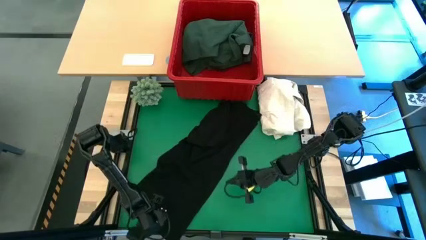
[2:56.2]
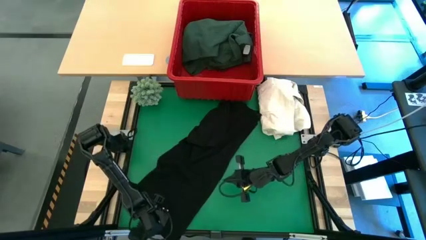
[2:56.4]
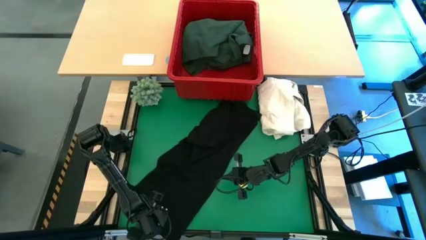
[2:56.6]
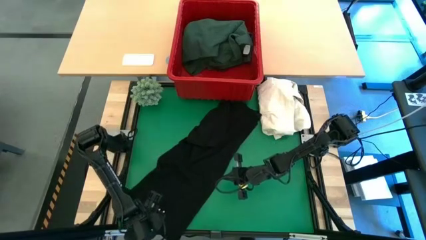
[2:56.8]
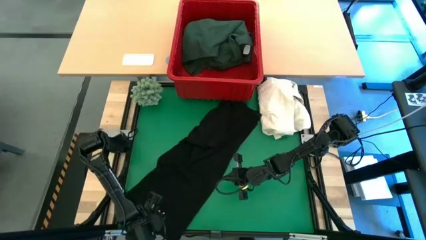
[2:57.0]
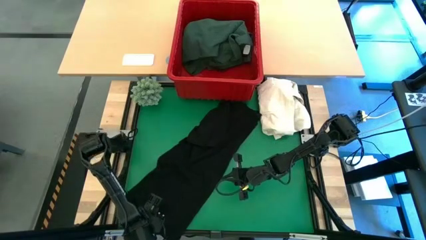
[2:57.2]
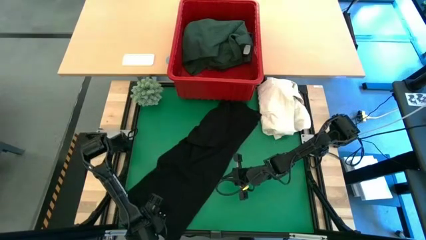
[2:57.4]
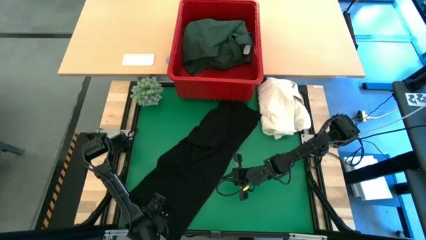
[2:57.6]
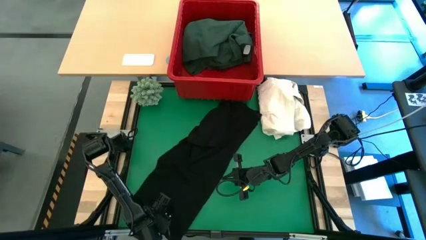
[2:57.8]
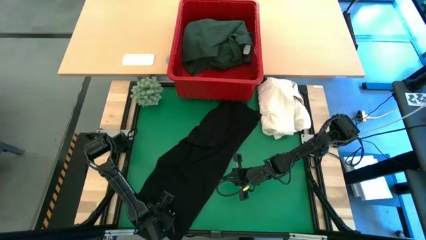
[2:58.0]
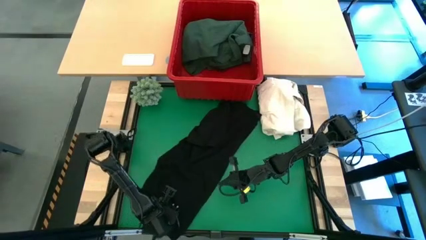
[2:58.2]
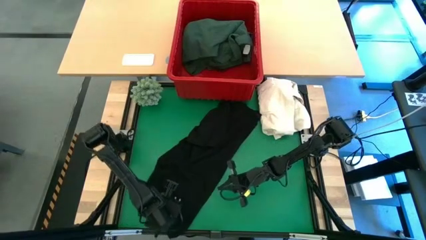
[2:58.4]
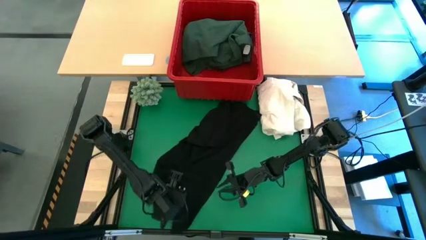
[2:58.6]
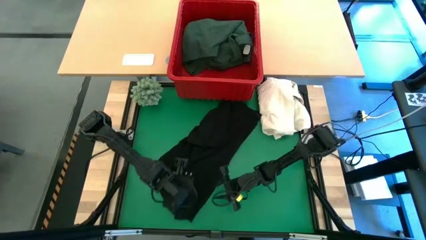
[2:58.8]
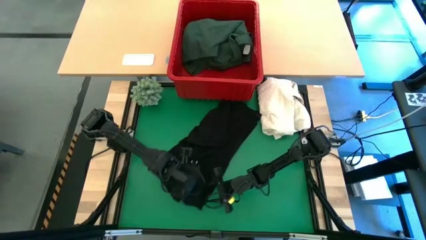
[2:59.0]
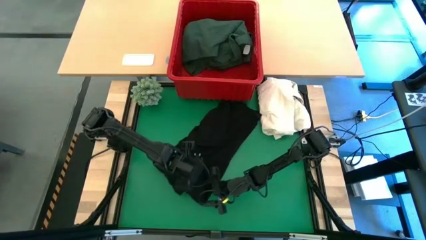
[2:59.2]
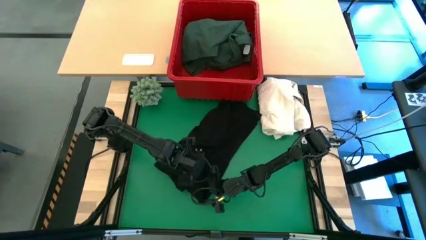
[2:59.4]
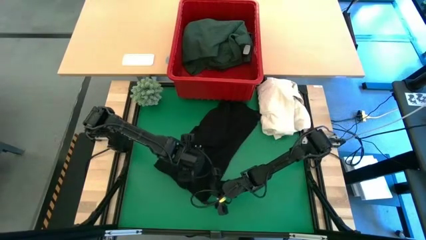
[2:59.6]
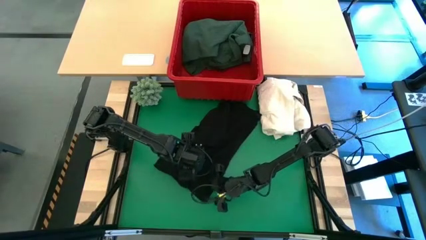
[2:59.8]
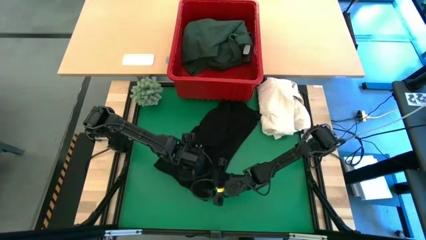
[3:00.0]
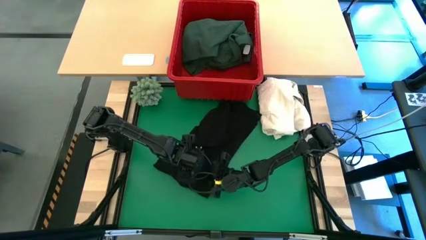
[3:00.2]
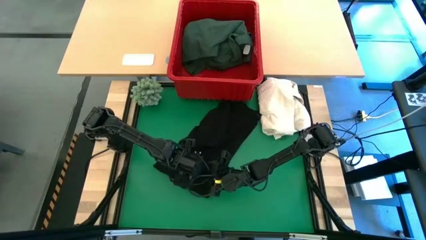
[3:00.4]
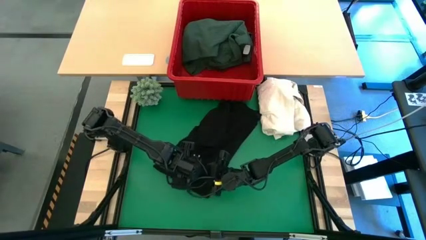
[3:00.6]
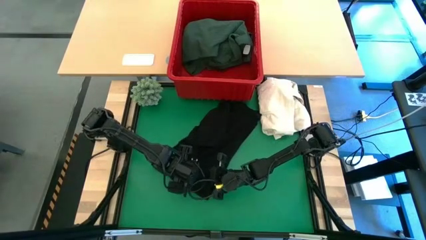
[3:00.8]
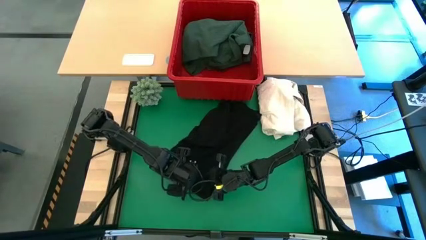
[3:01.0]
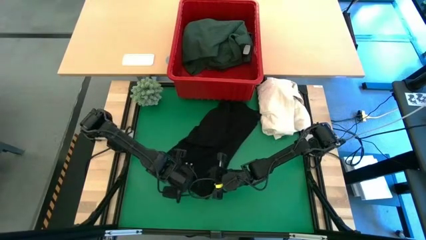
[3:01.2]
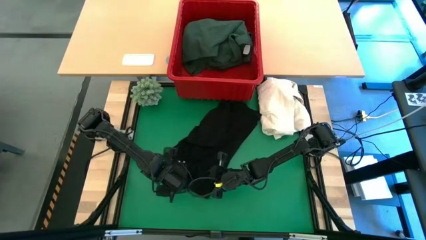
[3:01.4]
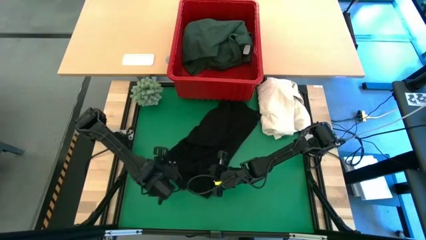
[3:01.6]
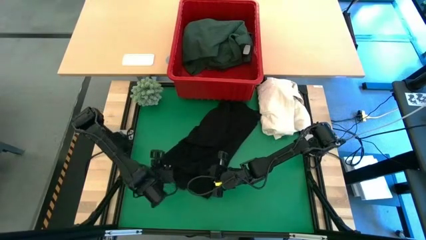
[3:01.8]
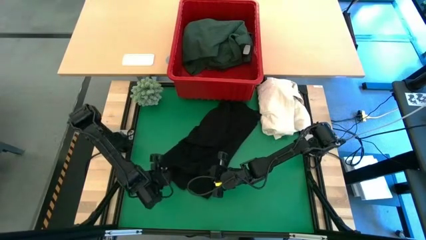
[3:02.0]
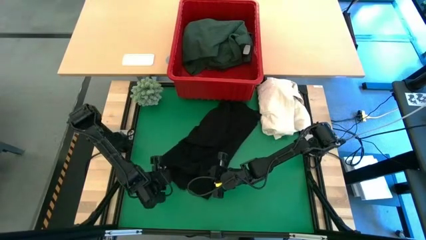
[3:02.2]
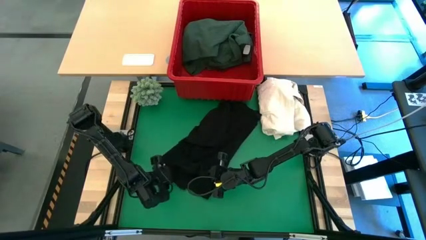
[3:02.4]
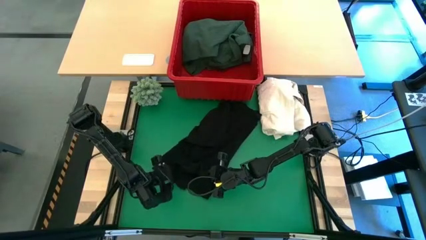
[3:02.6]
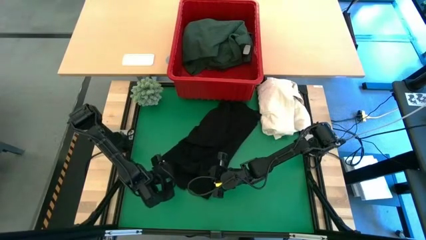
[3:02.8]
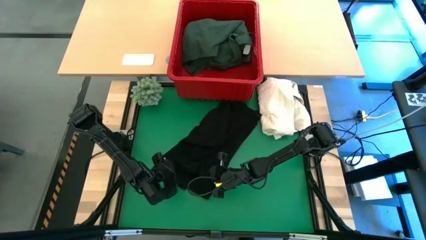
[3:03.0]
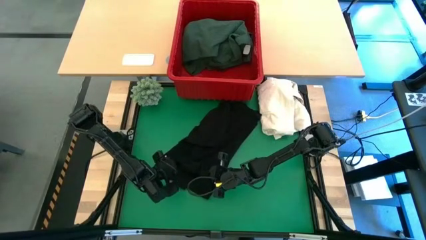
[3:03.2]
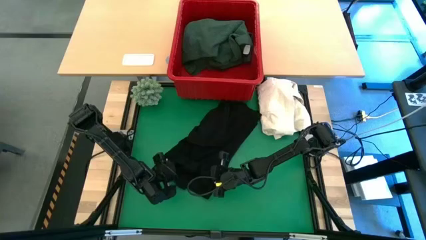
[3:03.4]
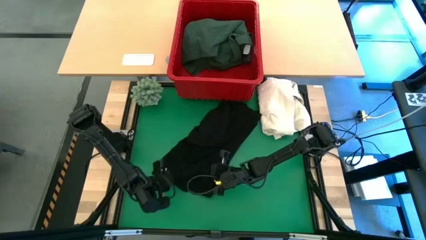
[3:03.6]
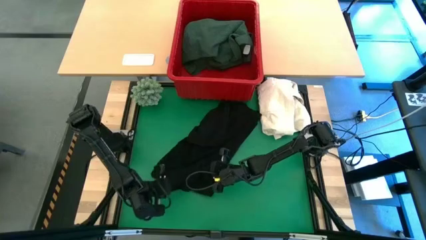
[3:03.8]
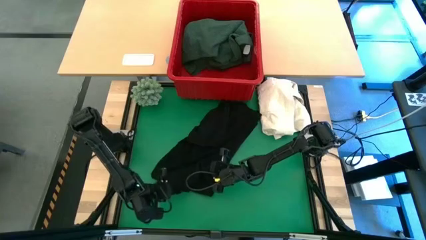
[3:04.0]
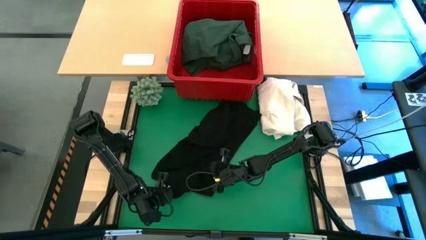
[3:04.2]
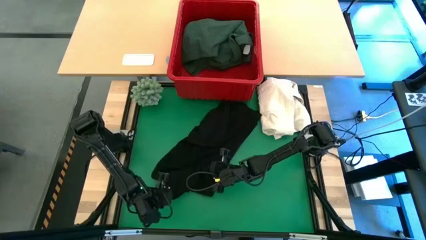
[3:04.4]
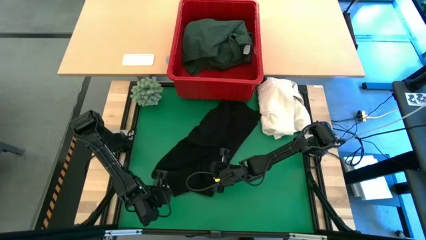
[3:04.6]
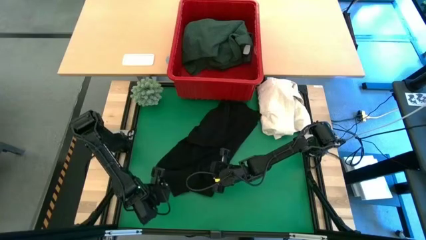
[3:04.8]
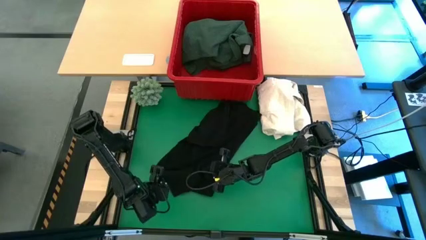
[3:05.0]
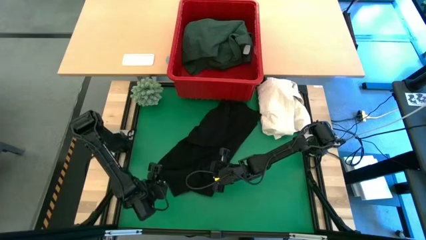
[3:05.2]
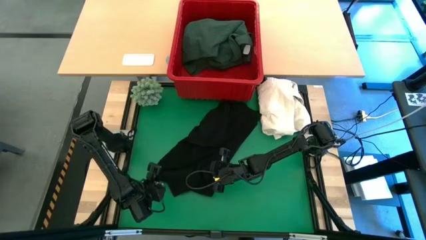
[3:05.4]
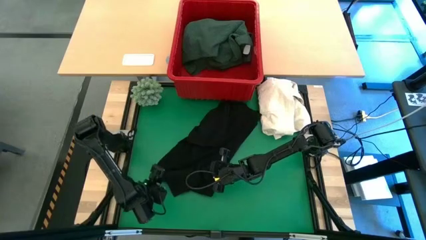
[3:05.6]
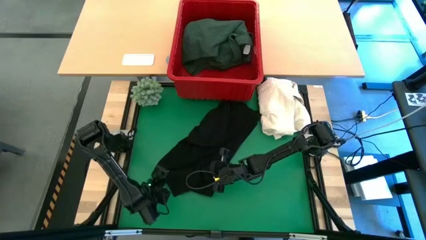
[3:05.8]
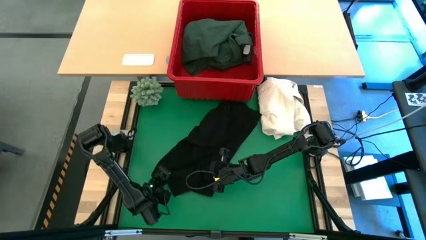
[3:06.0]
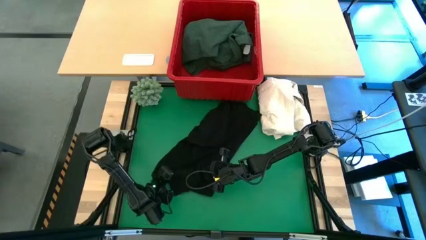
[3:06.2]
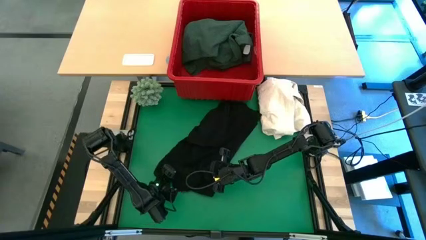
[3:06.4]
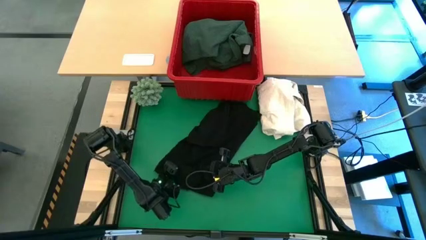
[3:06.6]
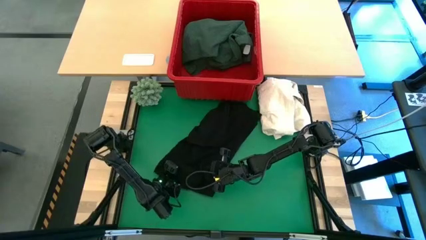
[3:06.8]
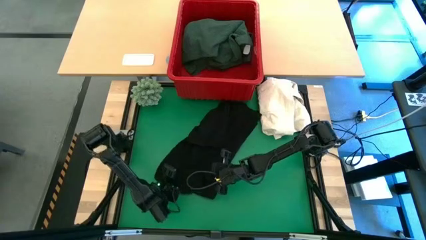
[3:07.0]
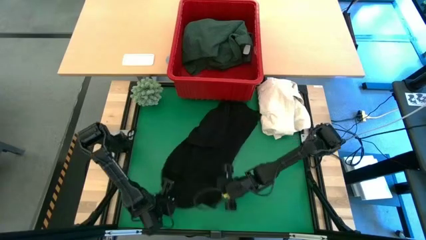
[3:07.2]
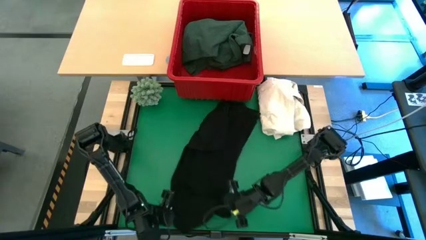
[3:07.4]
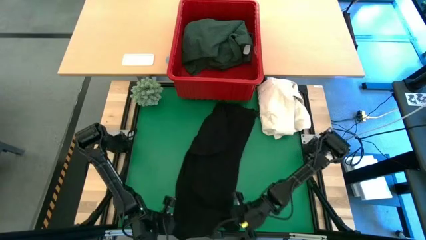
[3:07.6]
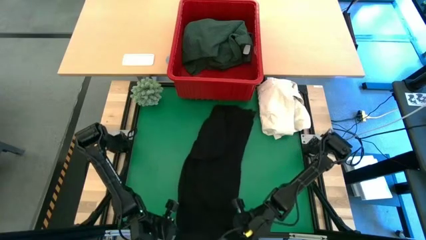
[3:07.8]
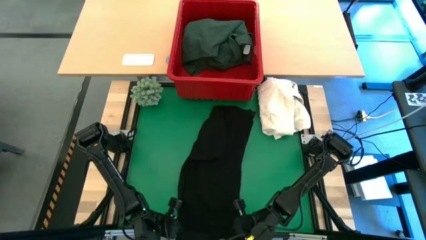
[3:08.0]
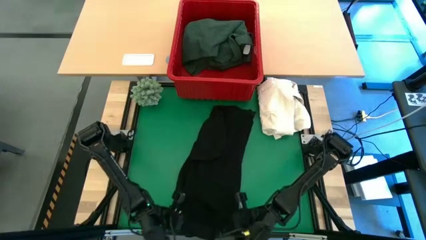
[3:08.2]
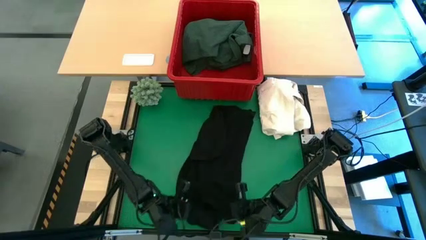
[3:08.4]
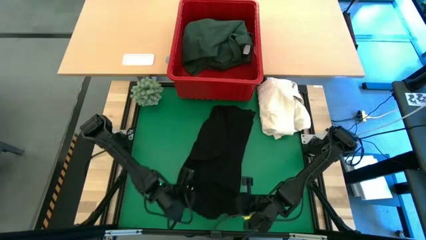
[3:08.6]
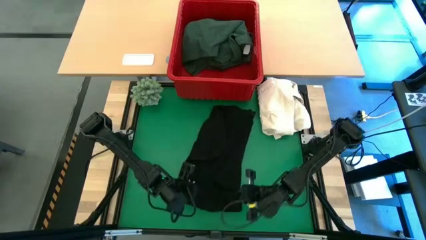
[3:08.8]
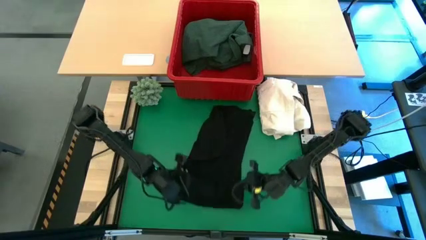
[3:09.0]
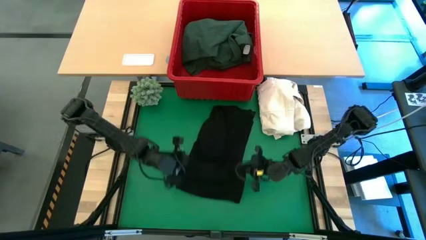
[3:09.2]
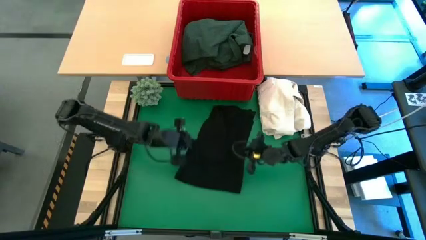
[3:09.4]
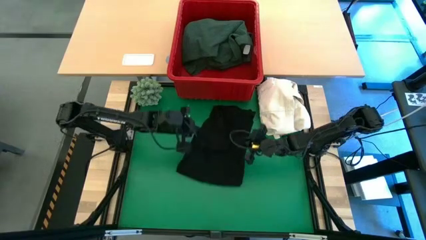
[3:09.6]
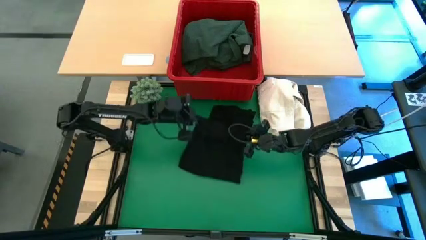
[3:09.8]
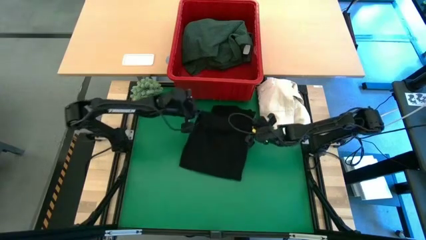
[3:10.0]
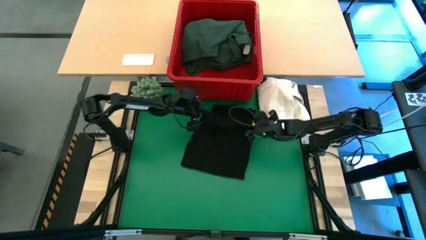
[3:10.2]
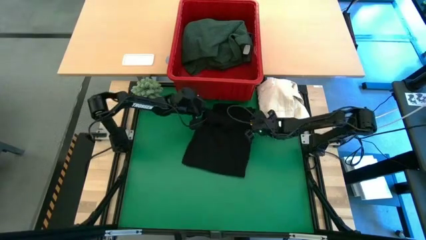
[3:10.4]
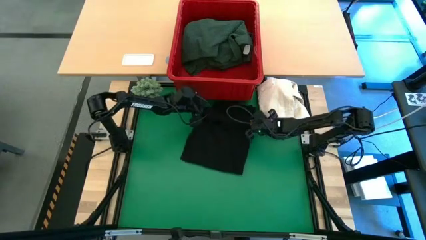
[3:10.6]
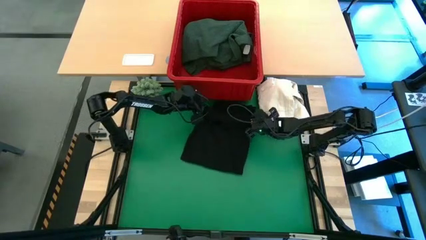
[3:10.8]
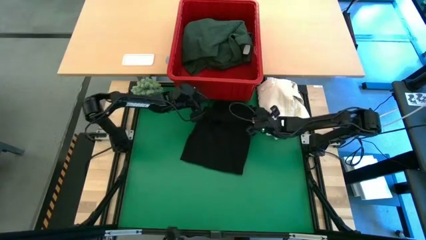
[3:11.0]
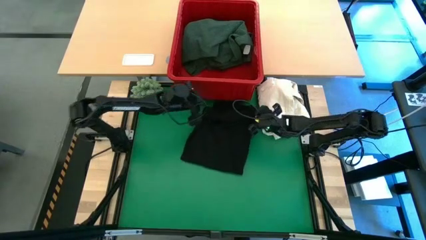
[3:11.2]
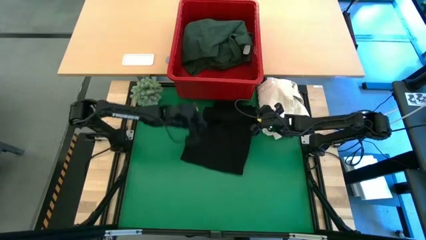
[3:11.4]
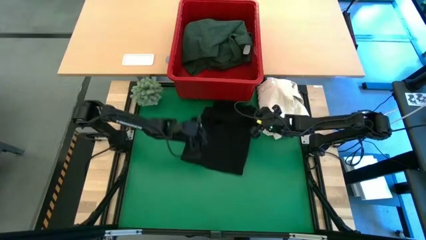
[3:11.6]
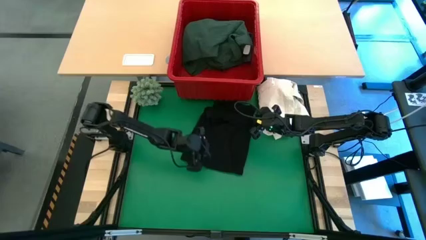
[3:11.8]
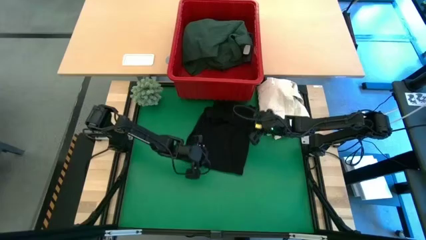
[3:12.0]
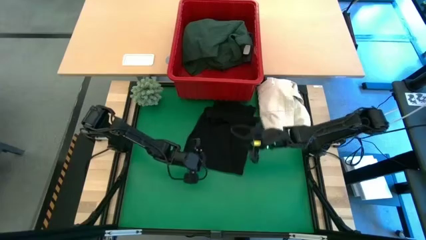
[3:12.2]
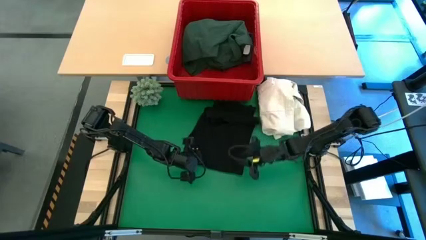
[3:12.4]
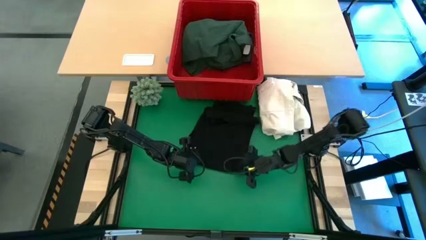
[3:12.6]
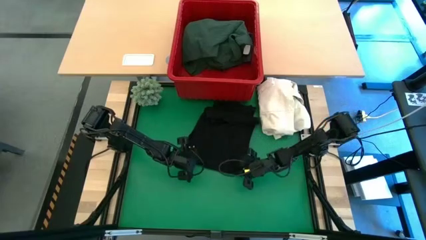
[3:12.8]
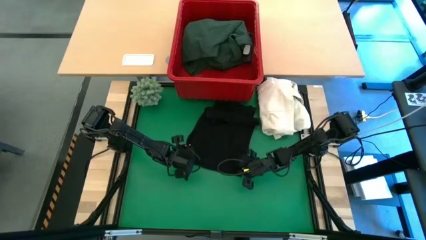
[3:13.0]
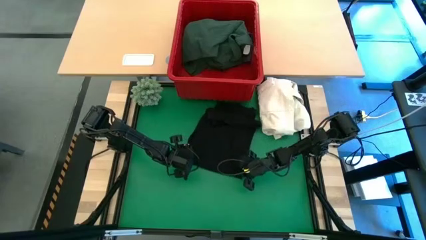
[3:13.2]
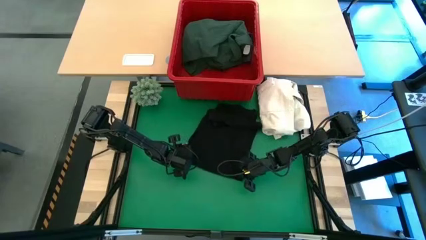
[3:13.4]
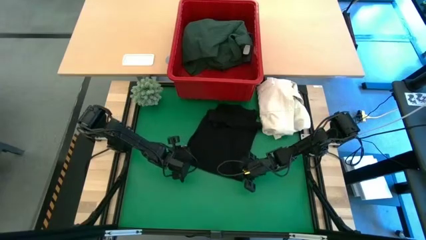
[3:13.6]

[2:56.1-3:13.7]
Task: Fold laundry
Fold the black shirt
